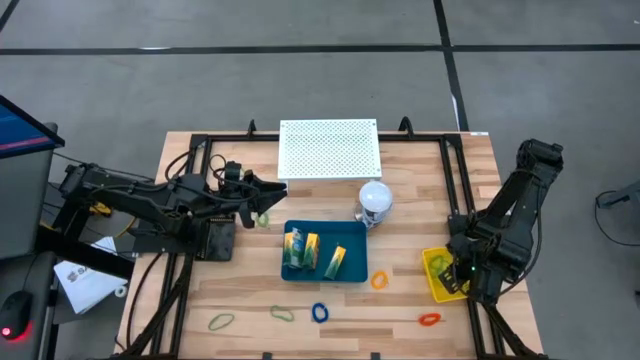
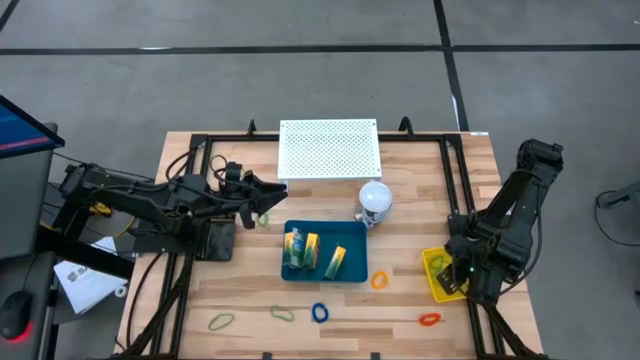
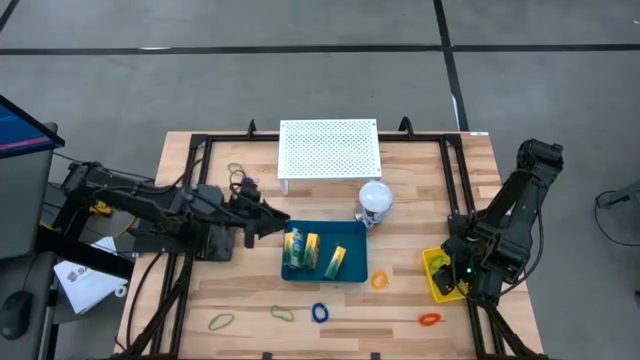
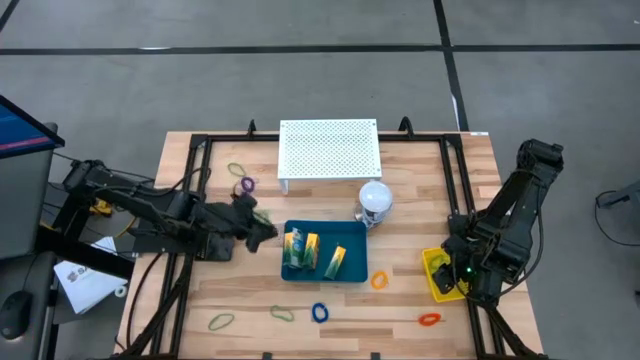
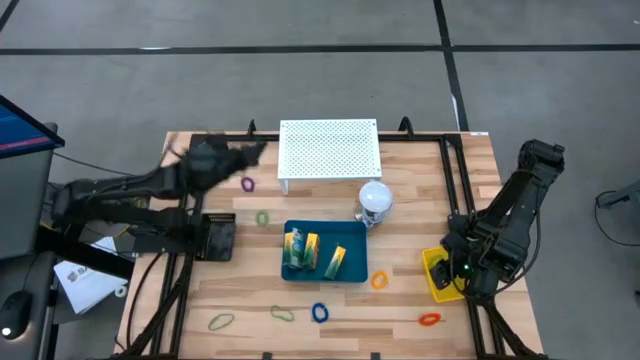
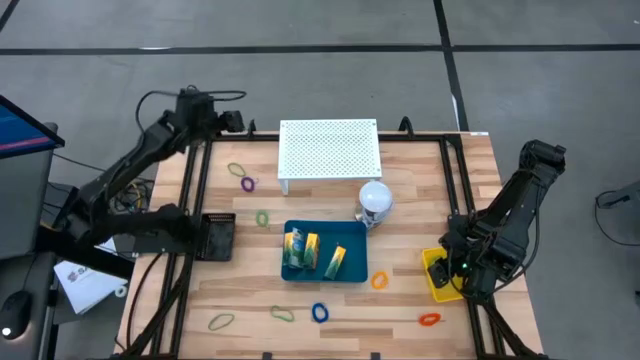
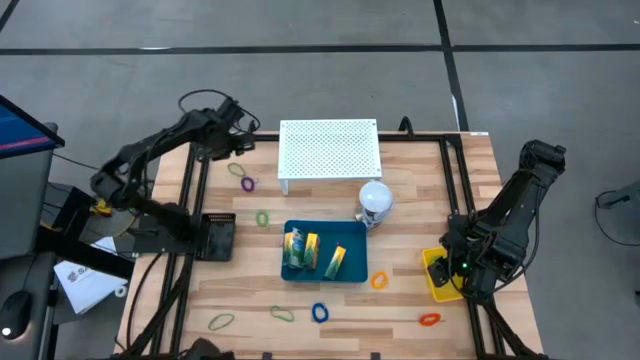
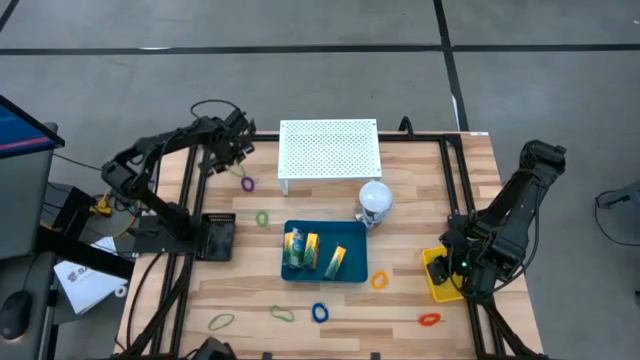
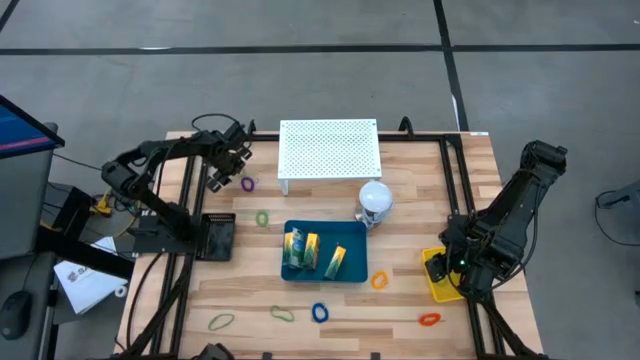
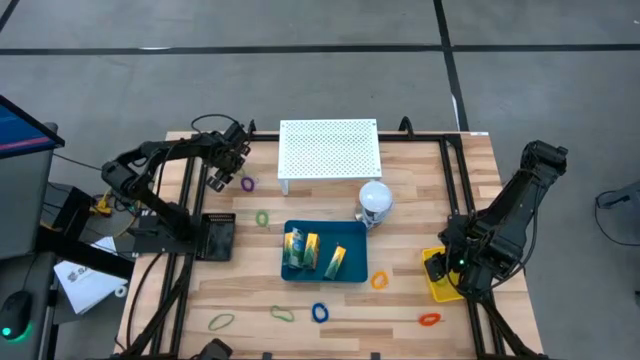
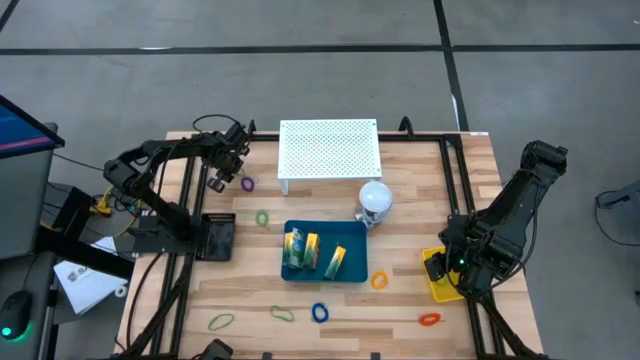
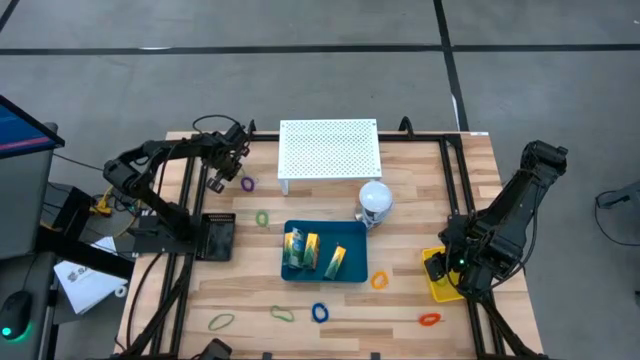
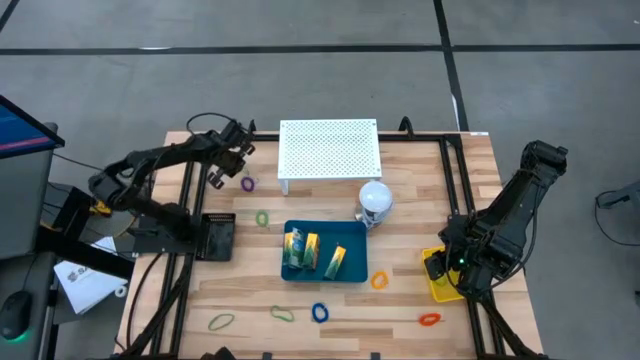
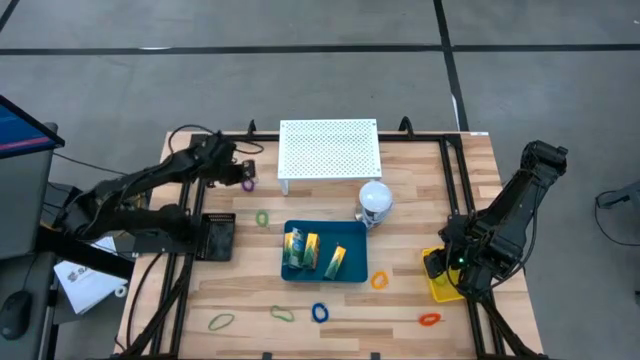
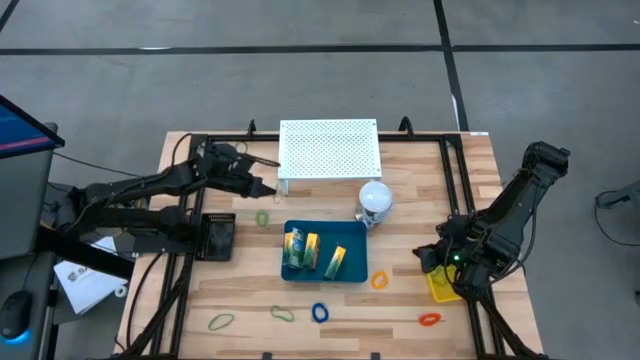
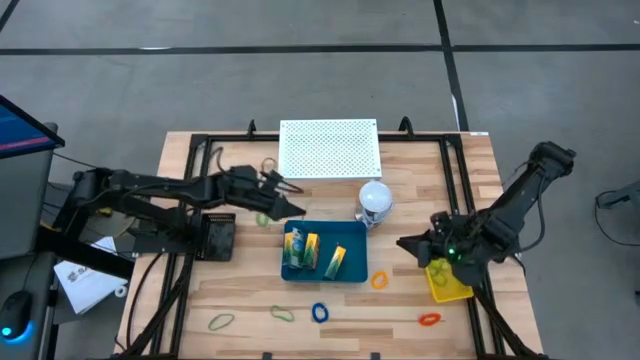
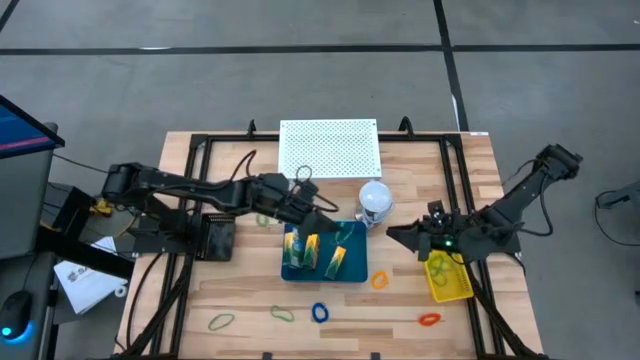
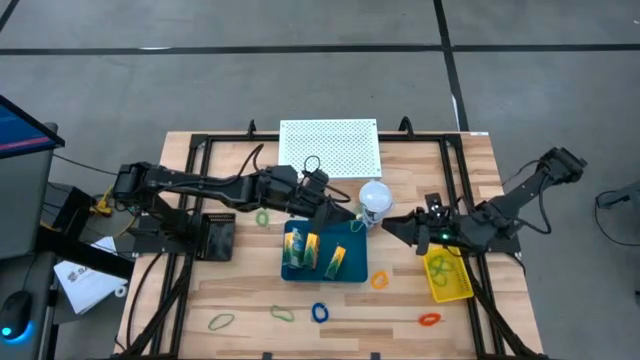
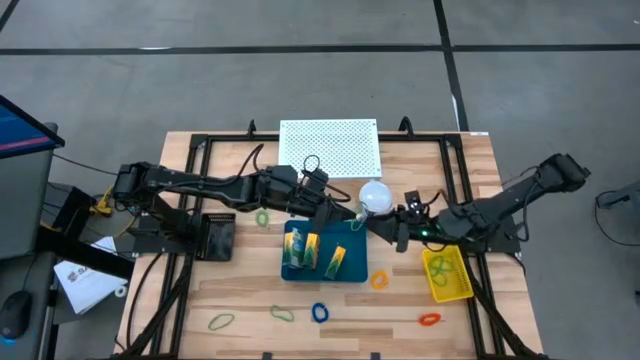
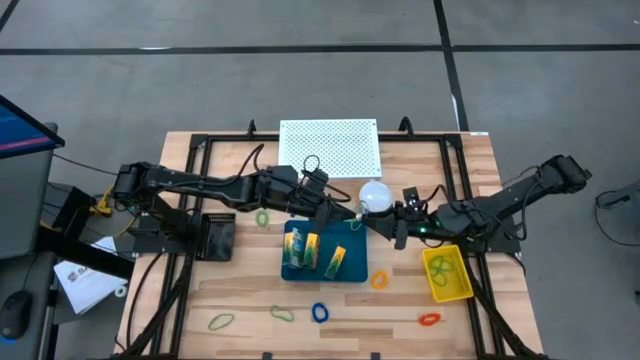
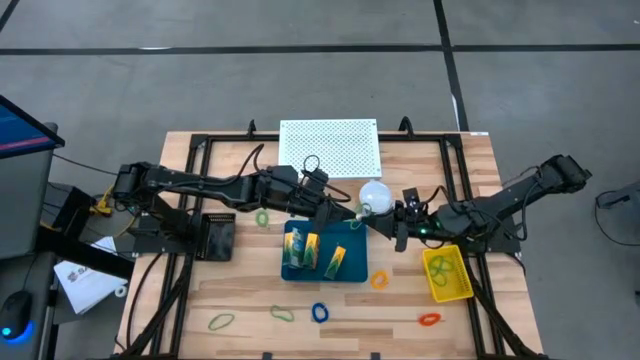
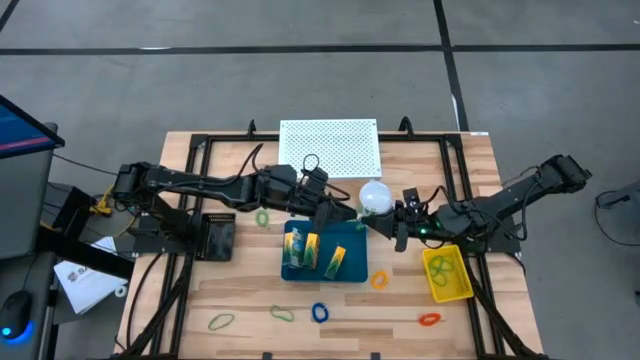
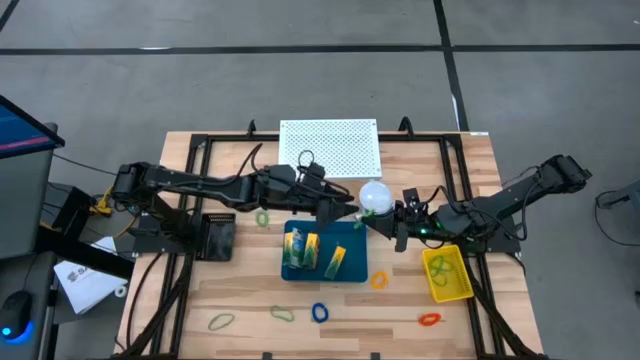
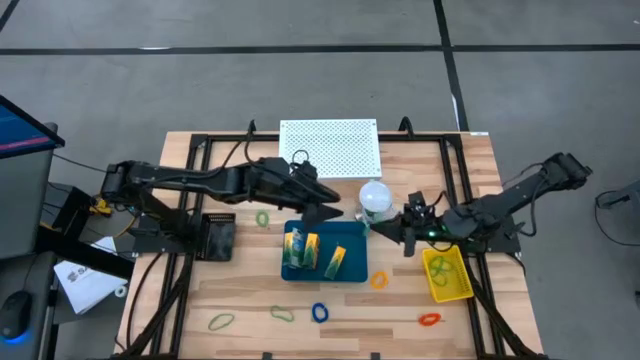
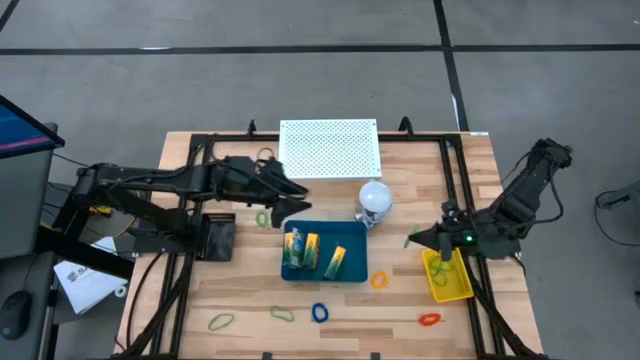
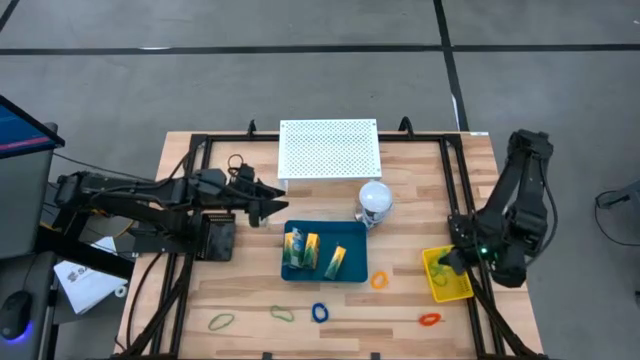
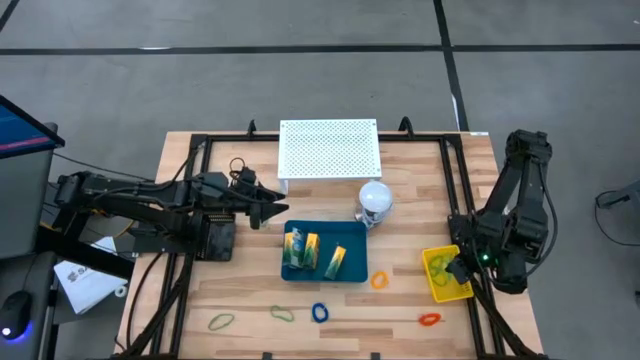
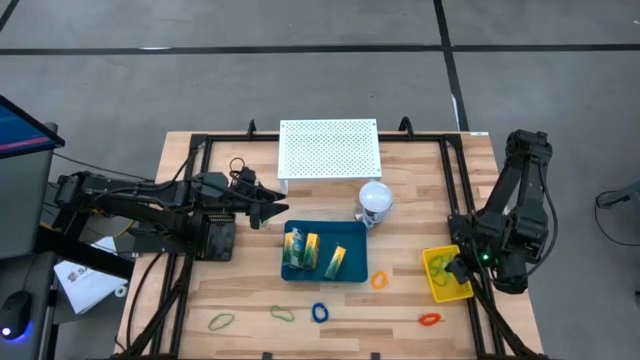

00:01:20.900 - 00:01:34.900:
Task: Pick & Place Office Desk Supplies
Put the top green rubber band into the yellow bin

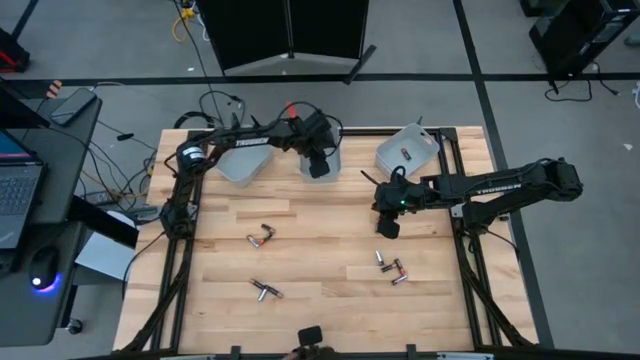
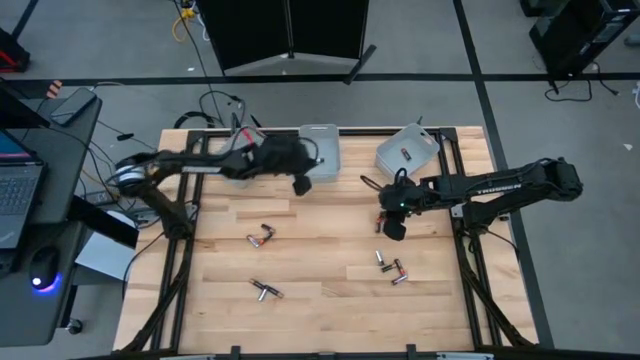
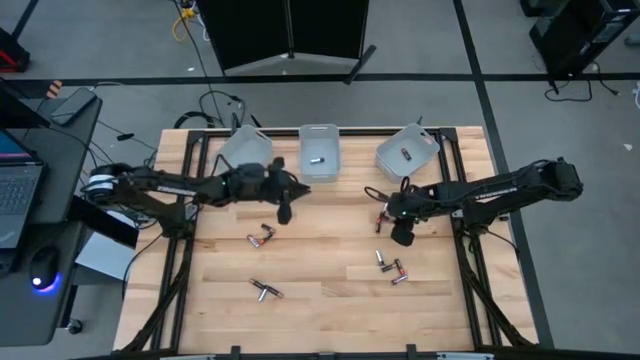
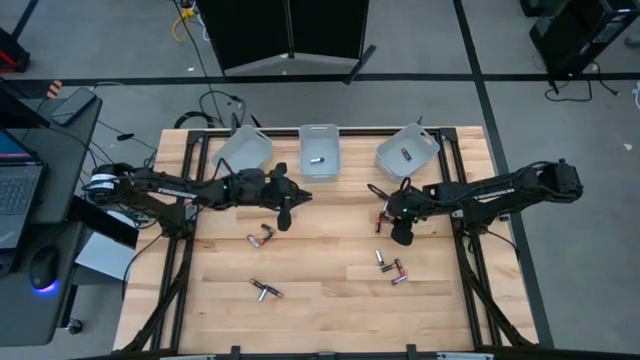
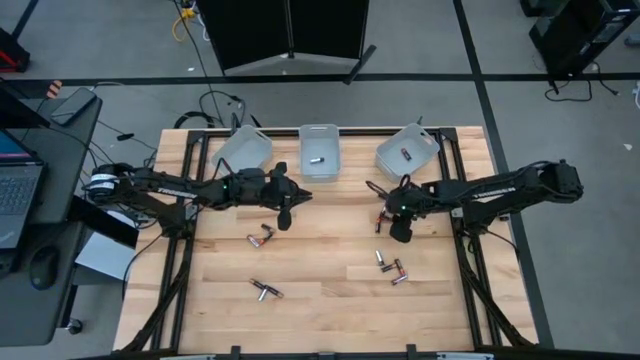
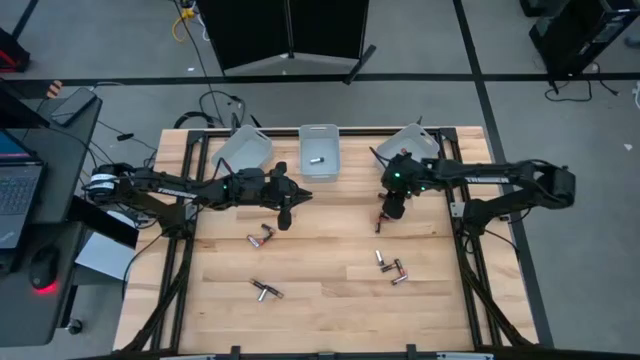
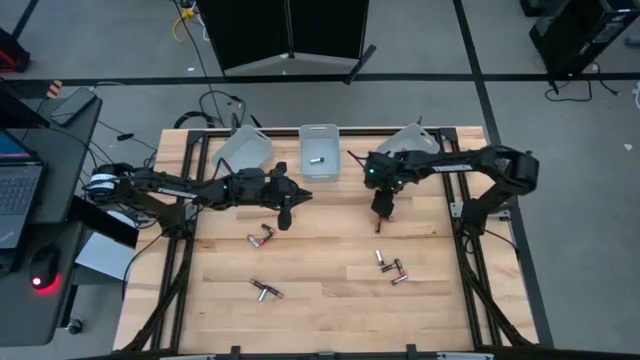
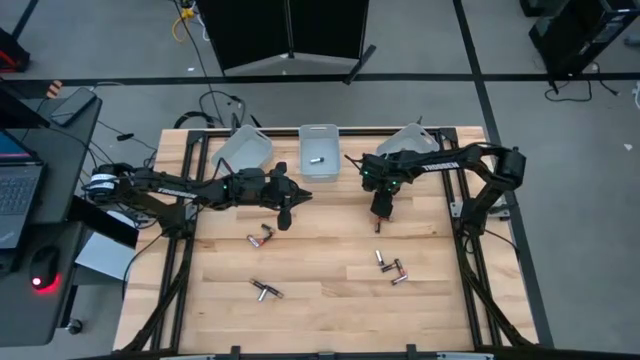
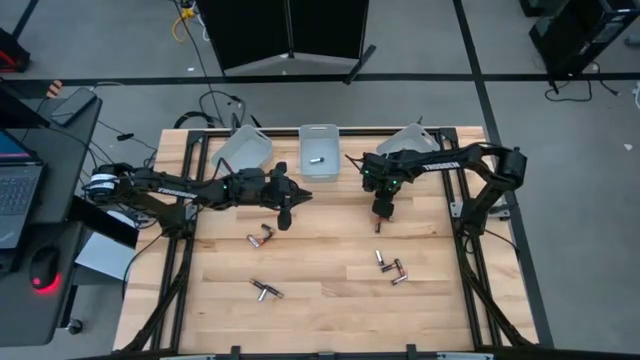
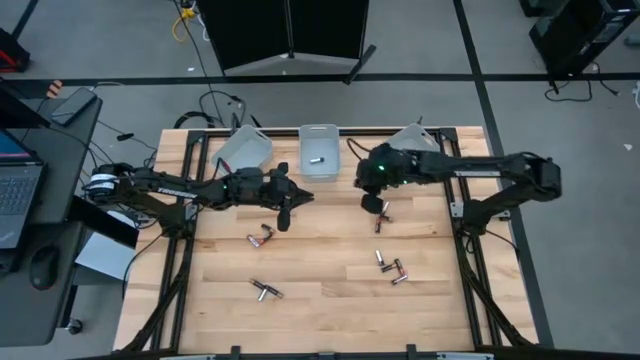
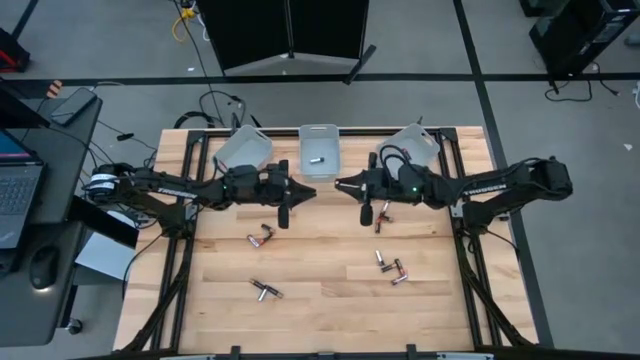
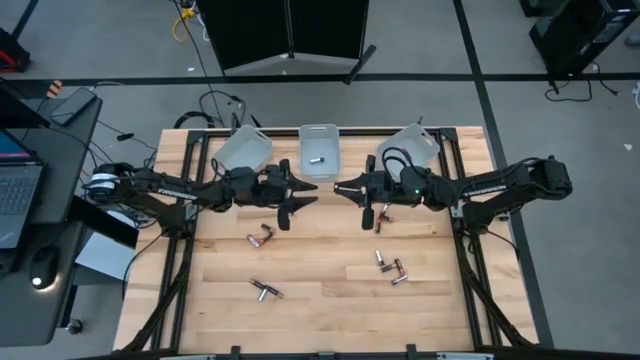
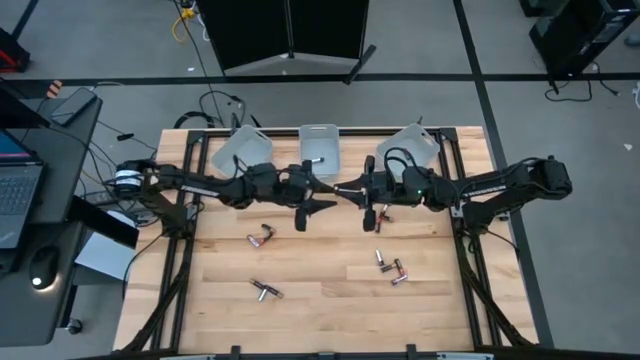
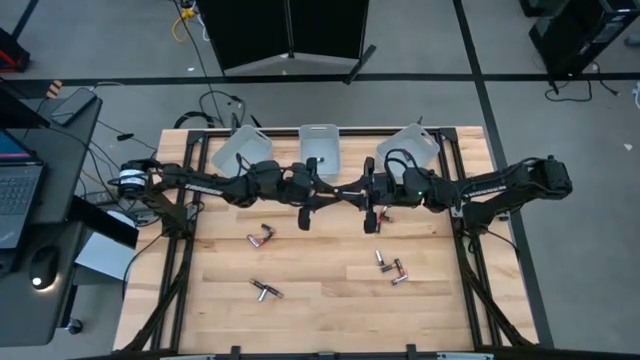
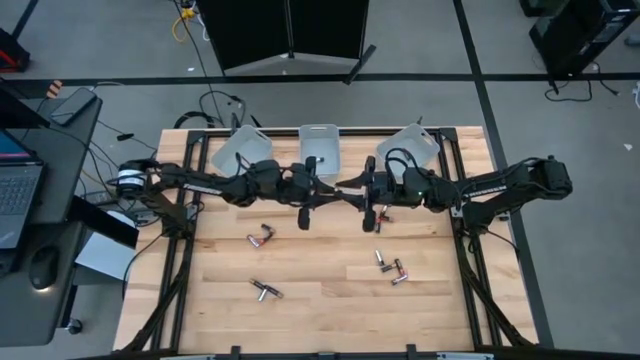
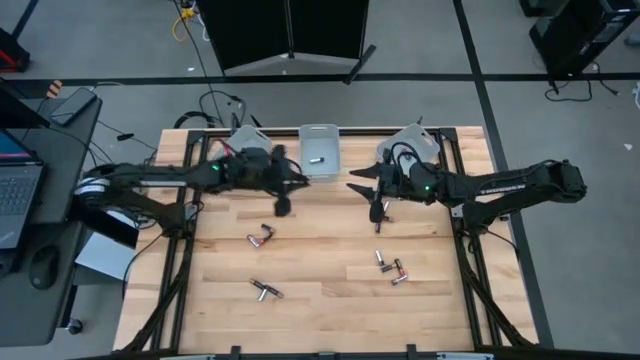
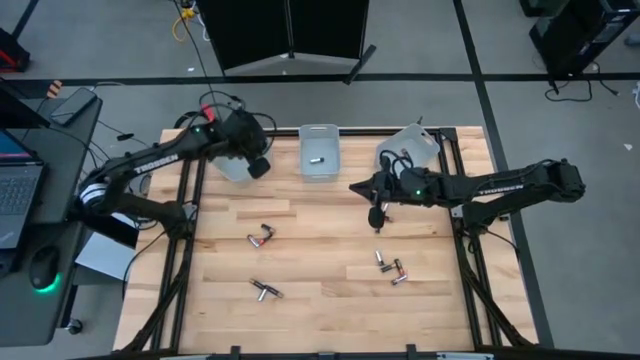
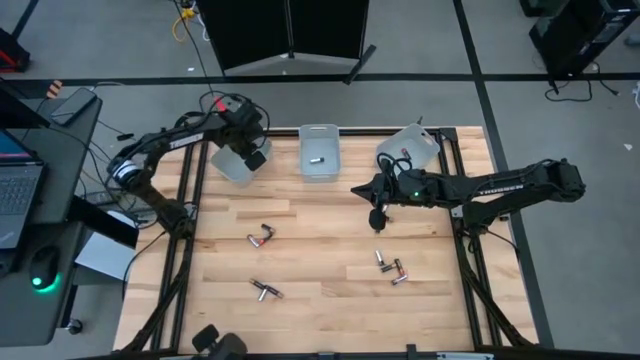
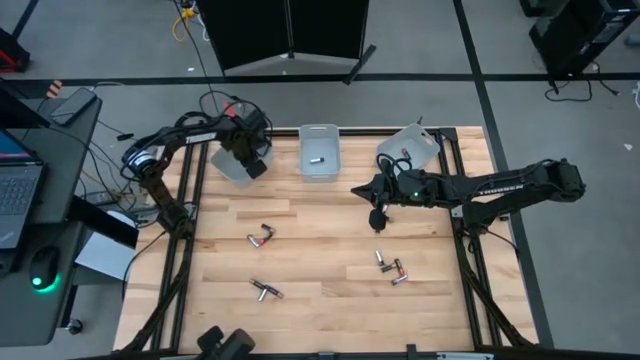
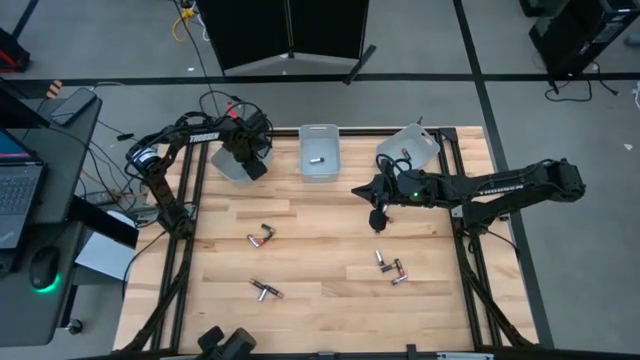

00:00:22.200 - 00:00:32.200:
Task: Sort batteries
Put the gold battery into the left gray bin
